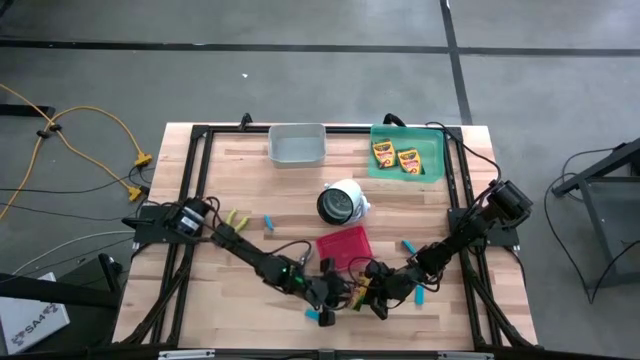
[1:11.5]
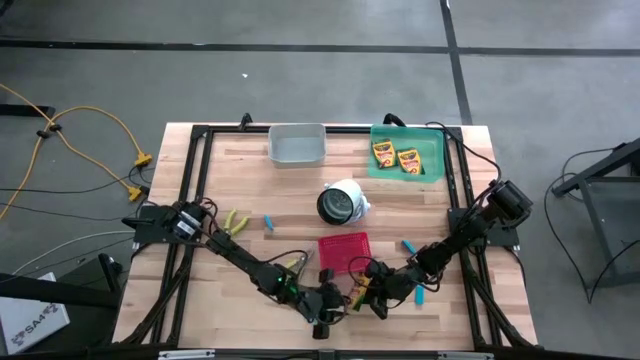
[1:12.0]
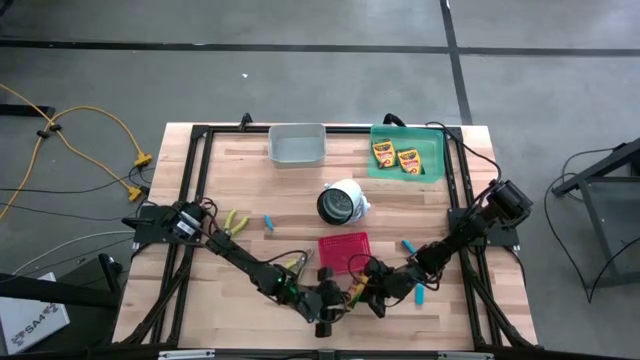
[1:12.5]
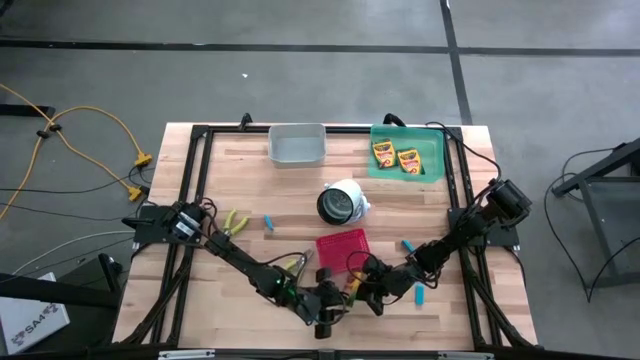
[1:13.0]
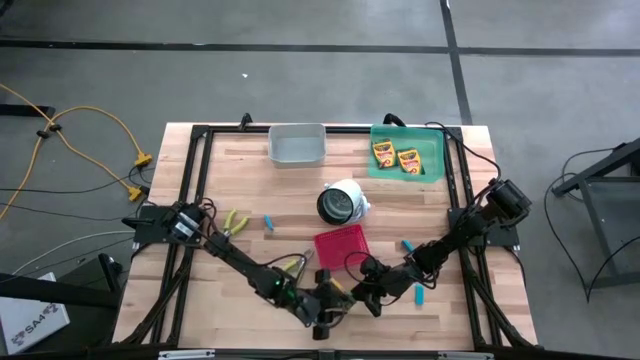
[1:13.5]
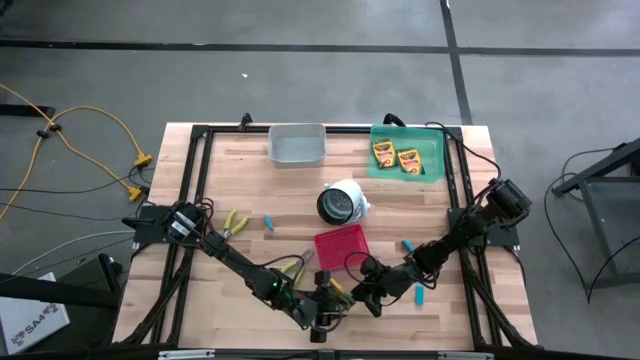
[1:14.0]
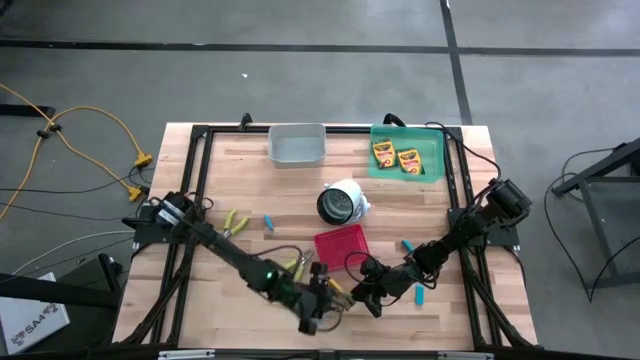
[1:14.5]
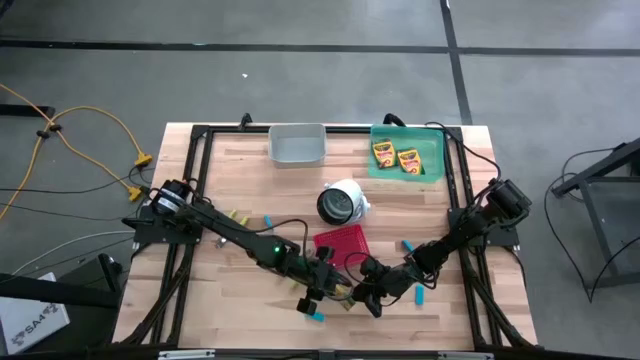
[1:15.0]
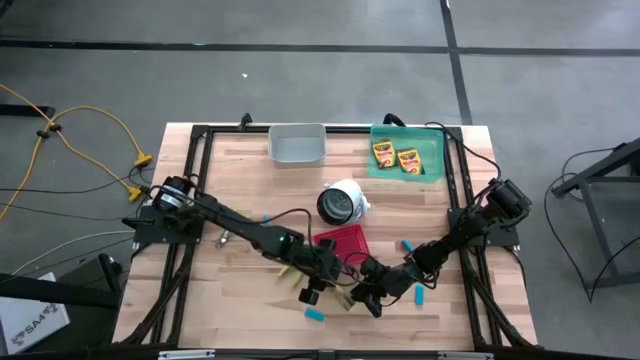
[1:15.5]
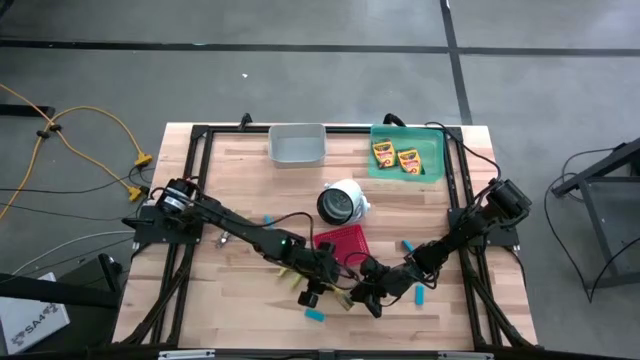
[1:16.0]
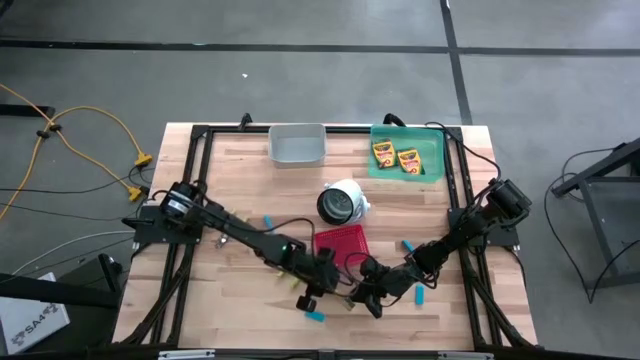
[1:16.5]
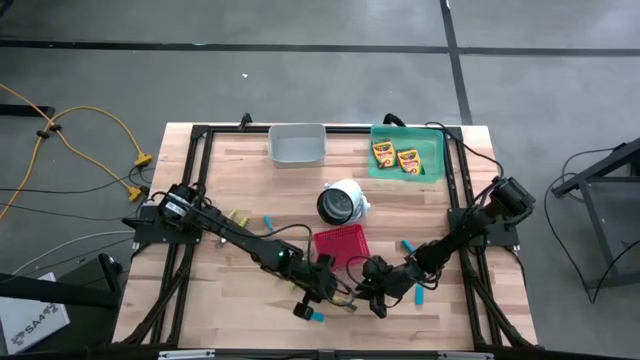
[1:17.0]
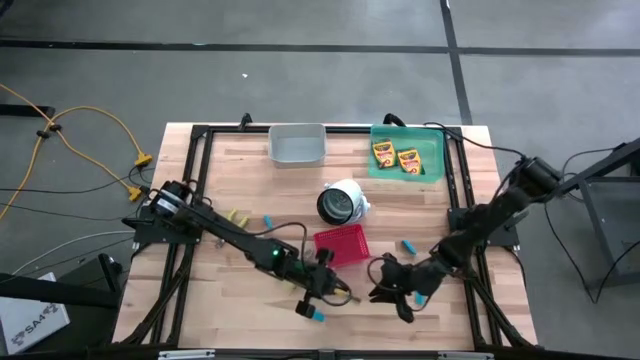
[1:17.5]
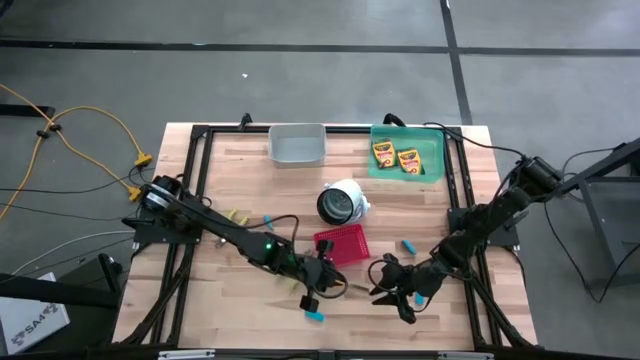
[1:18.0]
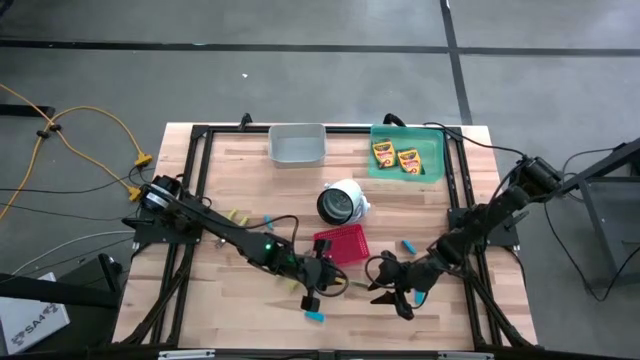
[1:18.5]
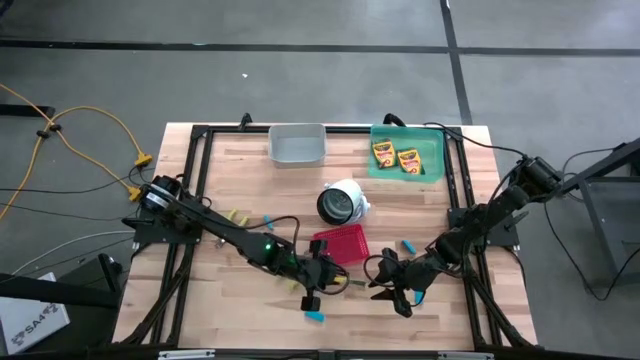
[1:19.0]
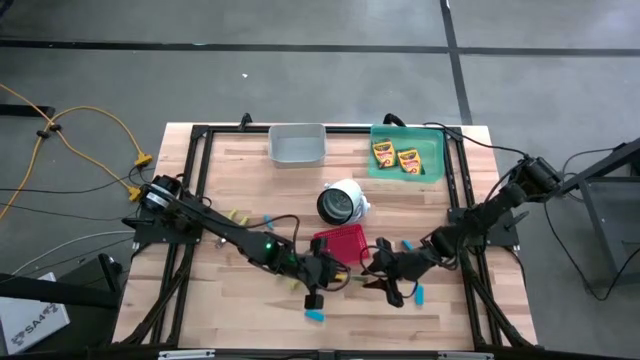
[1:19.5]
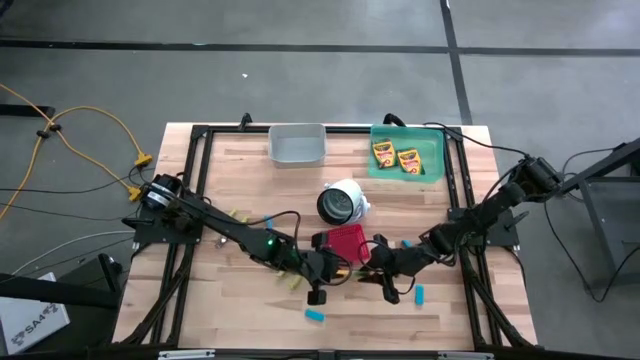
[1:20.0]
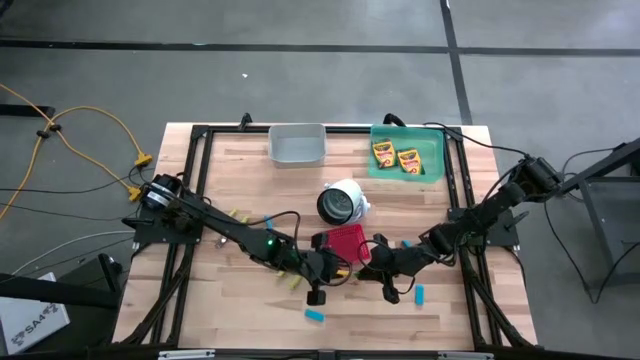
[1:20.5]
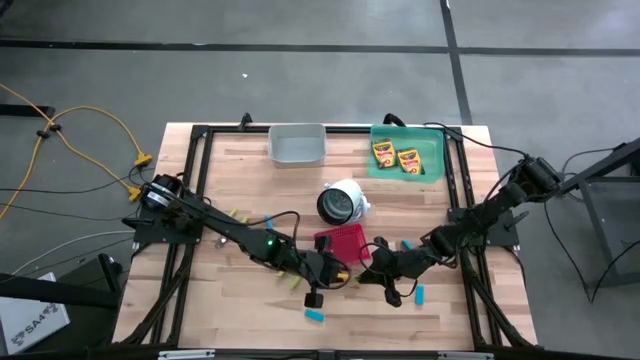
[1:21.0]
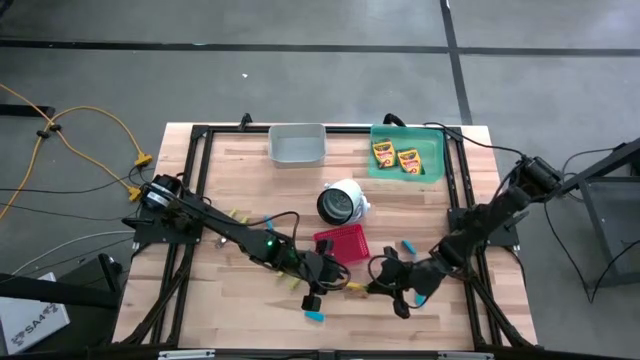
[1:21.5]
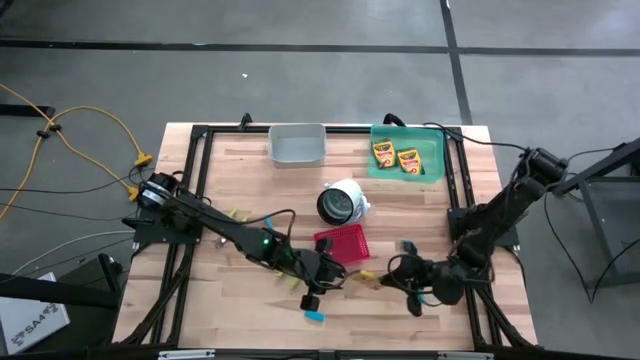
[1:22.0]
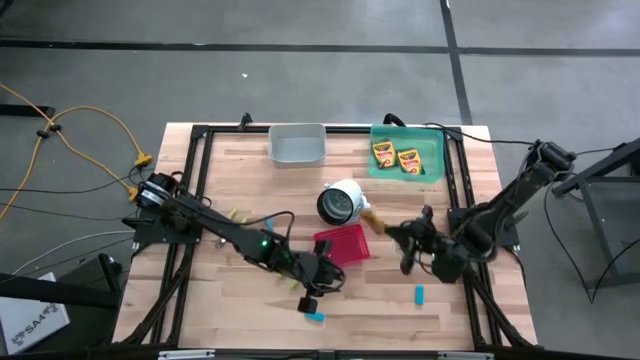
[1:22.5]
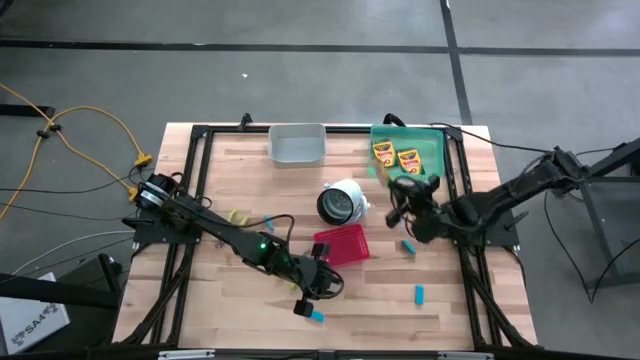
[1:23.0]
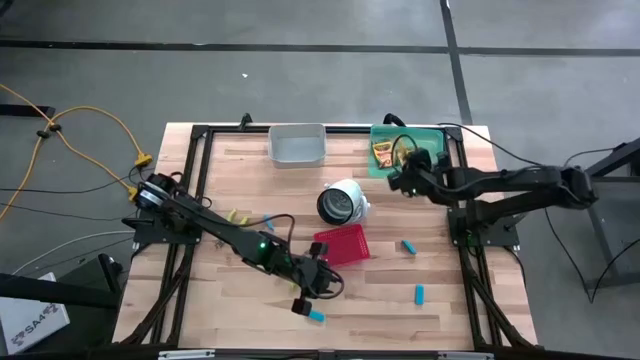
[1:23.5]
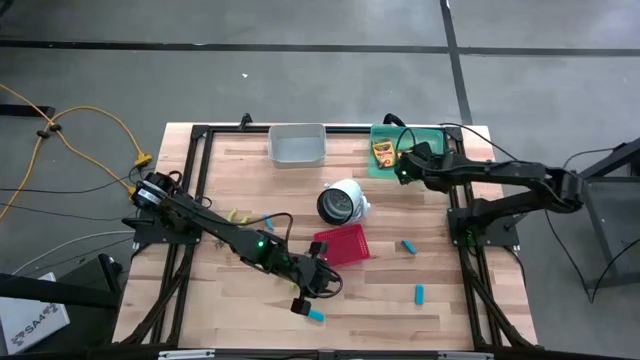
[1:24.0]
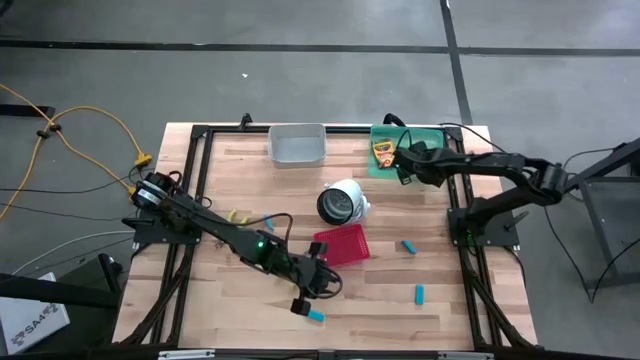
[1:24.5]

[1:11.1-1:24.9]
Task: Pick & Place School Supplies
Put the yellow crayon box into the green bin

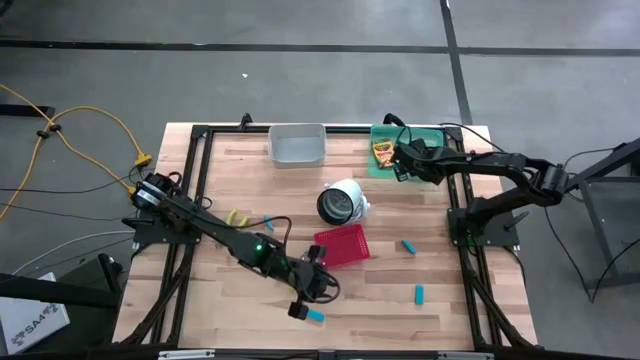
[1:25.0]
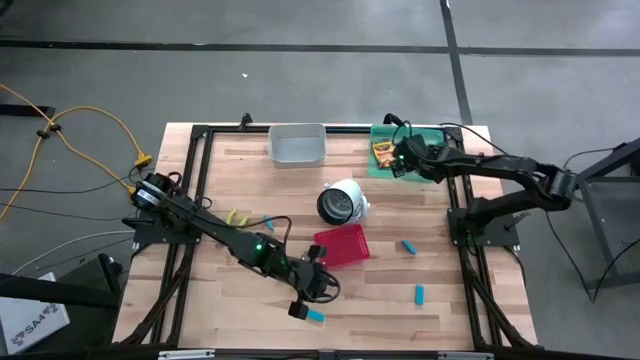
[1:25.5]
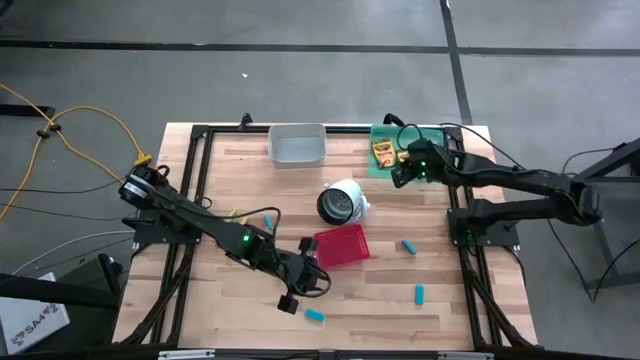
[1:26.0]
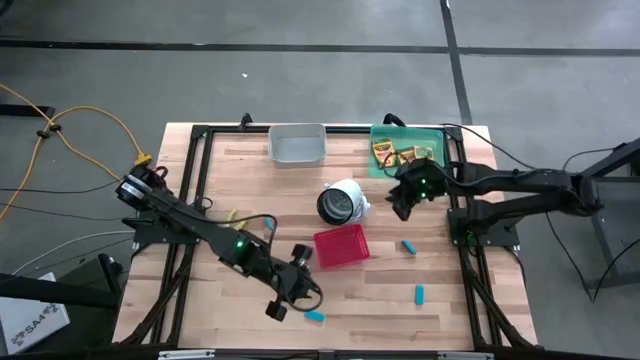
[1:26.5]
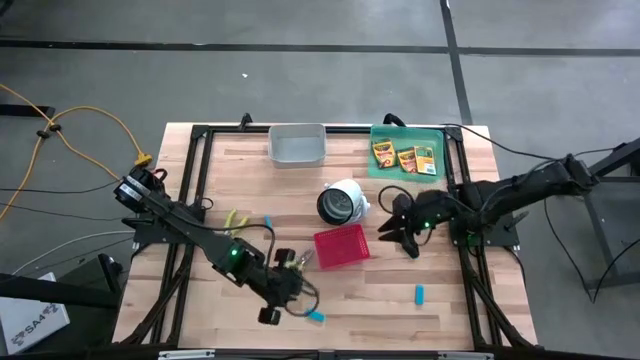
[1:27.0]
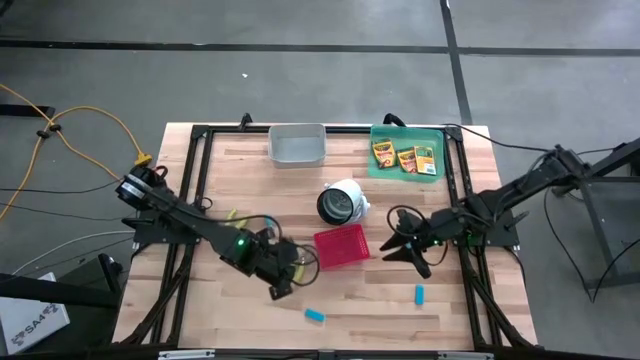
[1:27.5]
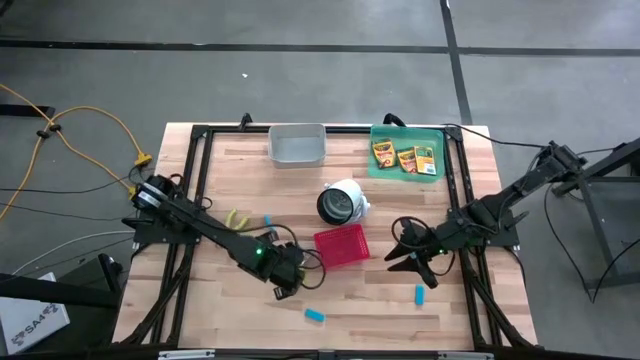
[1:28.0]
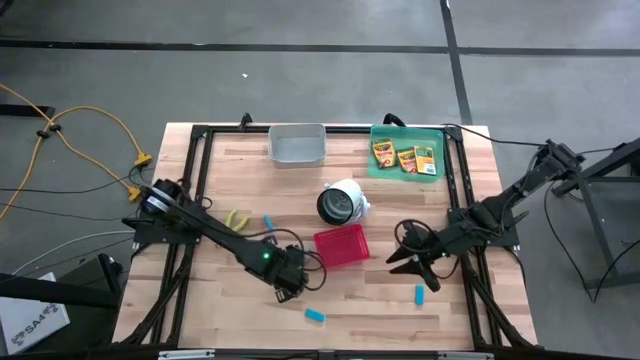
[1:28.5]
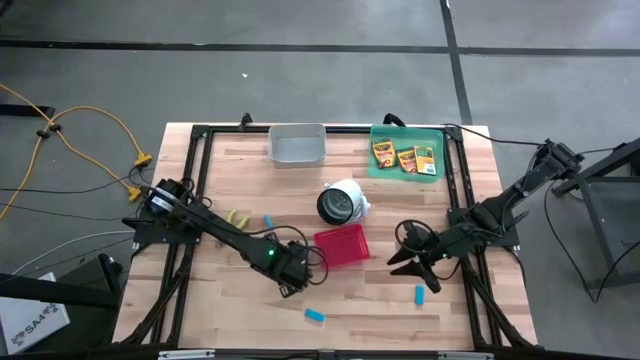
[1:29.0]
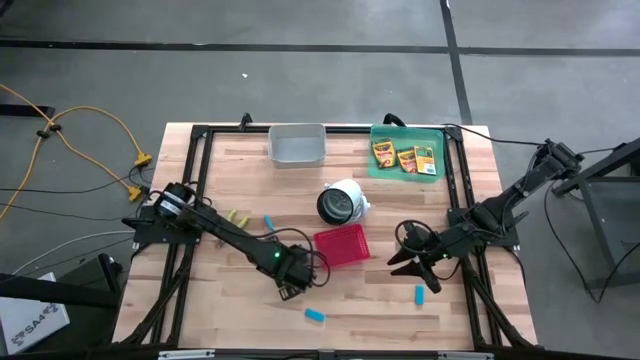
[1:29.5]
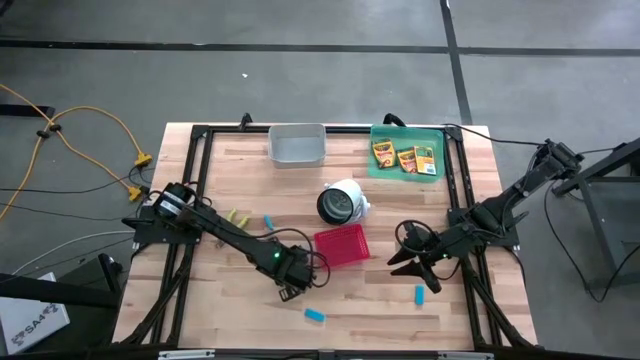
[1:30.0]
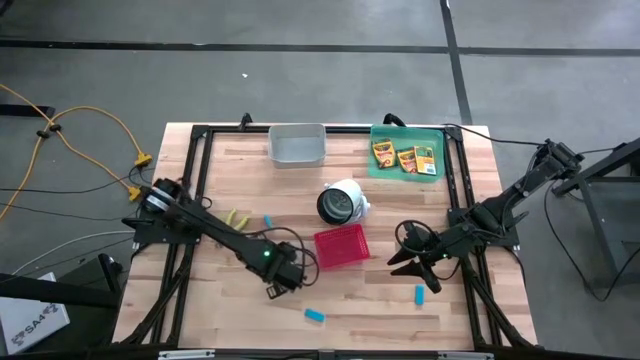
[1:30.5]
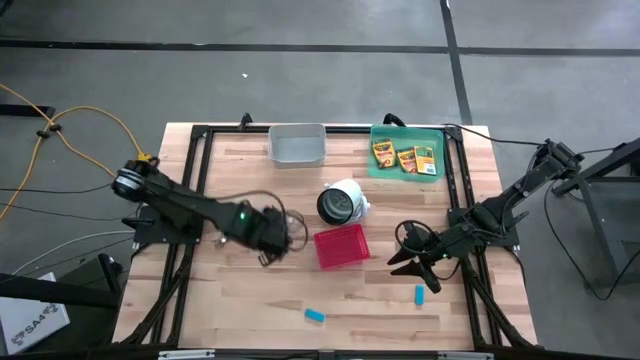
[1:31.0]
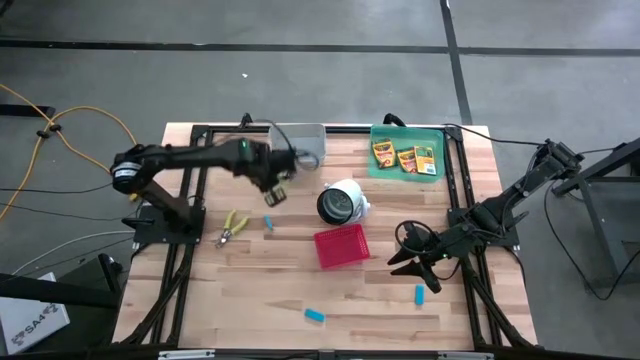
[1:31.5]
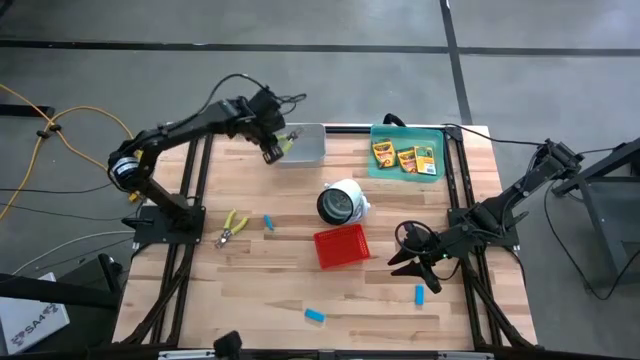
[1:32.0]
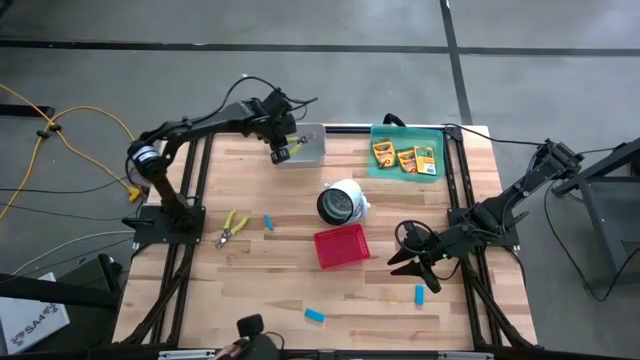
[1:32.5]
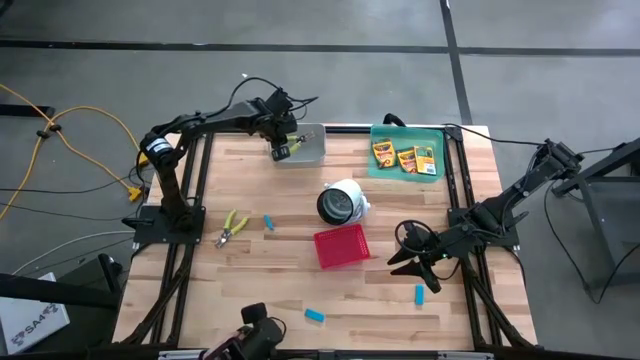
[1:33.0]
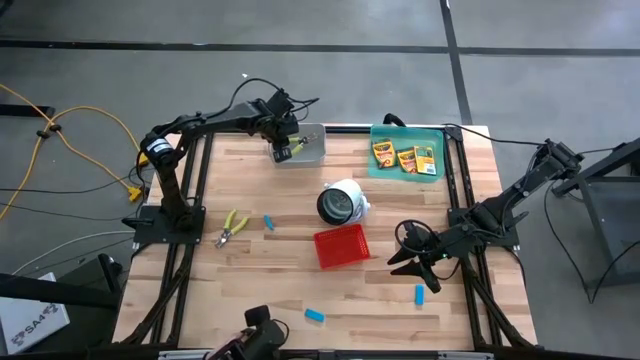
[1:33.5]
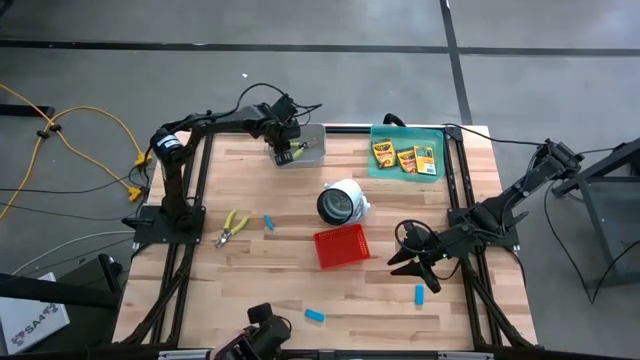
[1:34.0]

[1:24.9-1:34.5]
Put the right green hole puncher into the gray bin
